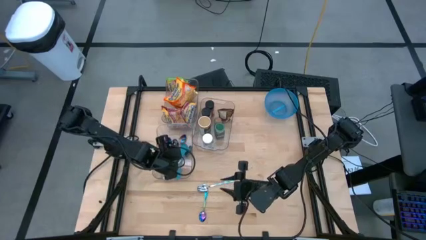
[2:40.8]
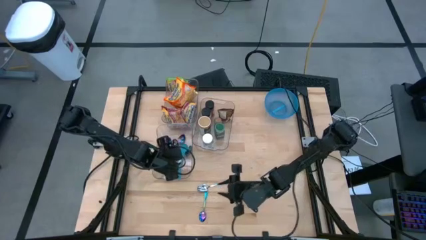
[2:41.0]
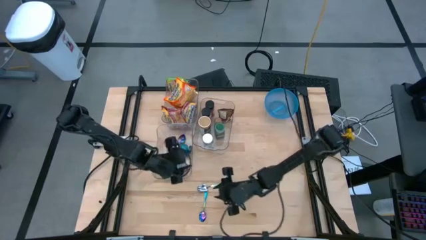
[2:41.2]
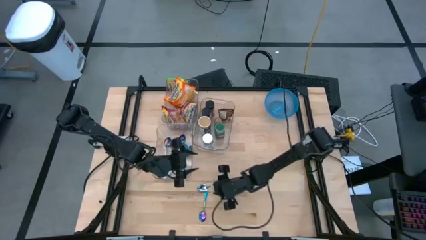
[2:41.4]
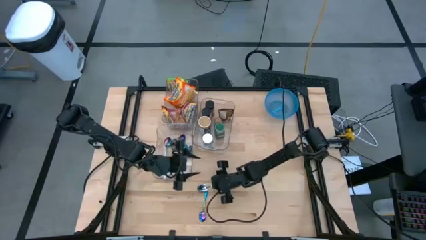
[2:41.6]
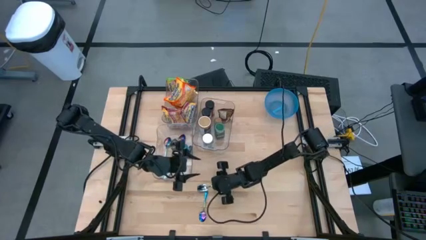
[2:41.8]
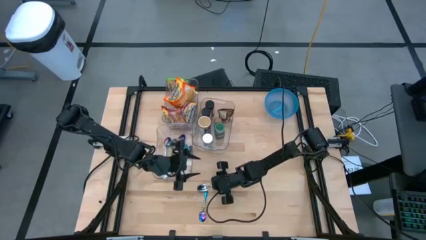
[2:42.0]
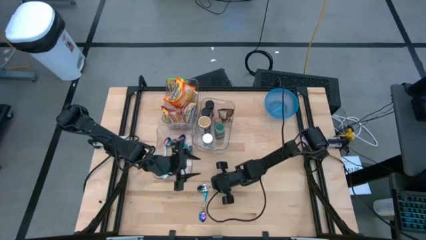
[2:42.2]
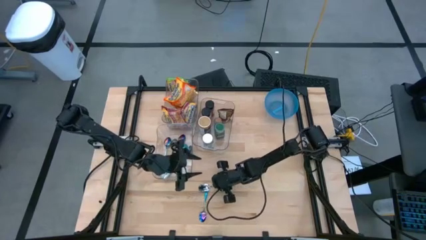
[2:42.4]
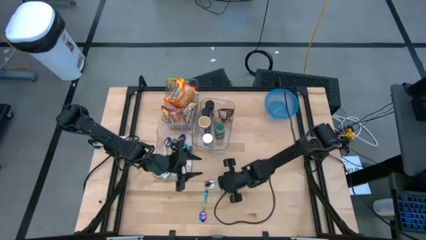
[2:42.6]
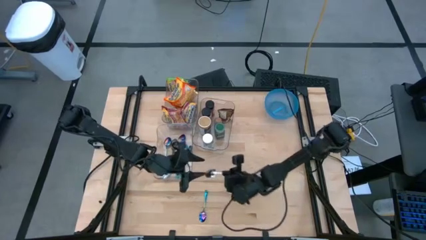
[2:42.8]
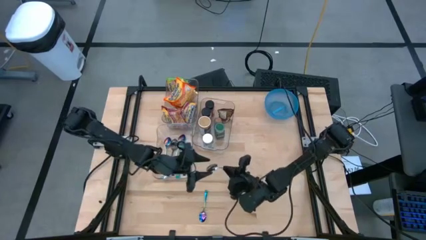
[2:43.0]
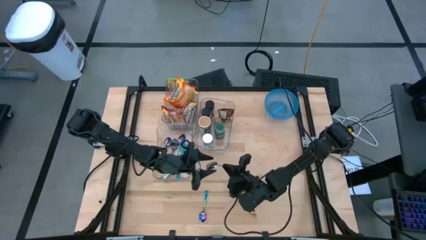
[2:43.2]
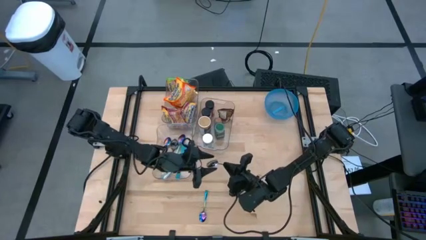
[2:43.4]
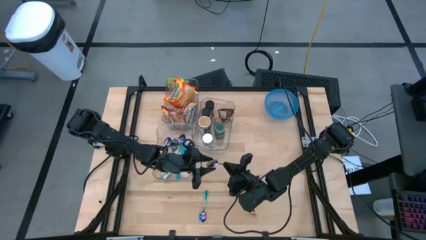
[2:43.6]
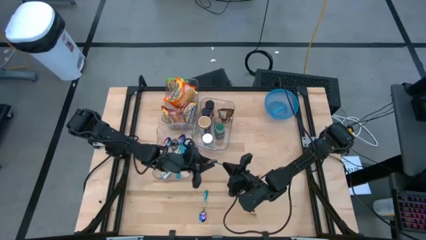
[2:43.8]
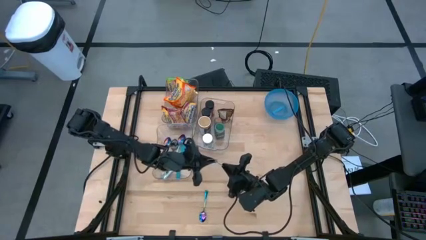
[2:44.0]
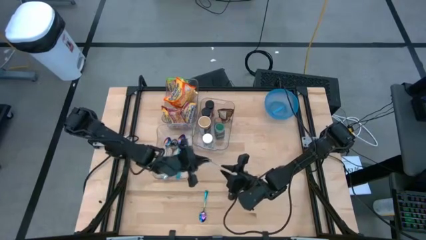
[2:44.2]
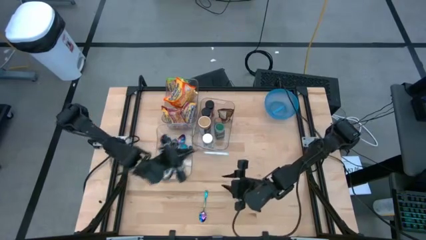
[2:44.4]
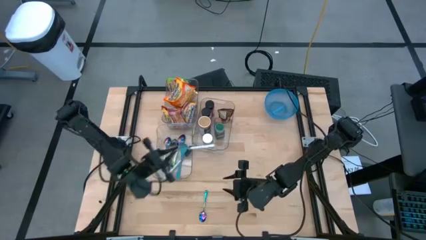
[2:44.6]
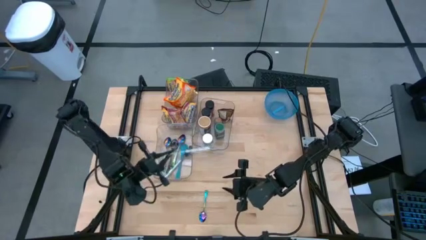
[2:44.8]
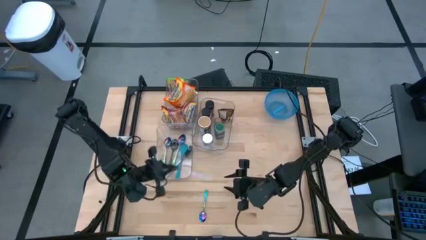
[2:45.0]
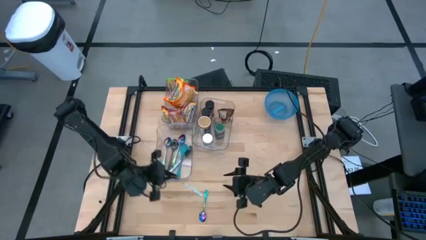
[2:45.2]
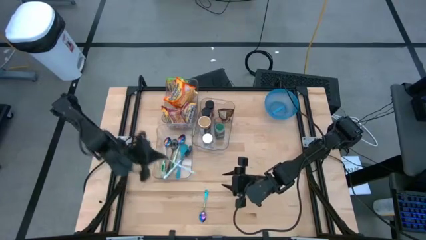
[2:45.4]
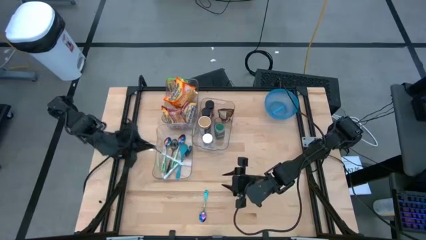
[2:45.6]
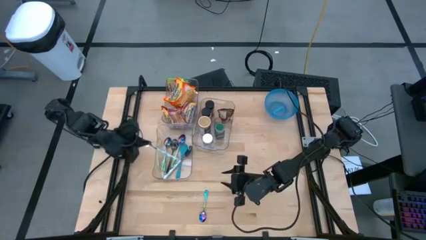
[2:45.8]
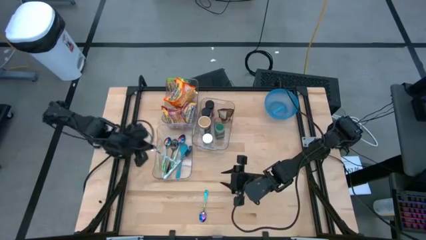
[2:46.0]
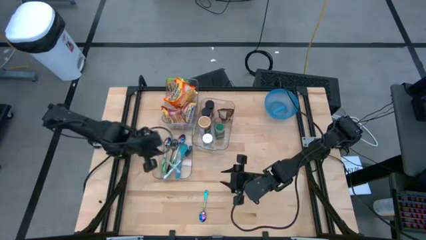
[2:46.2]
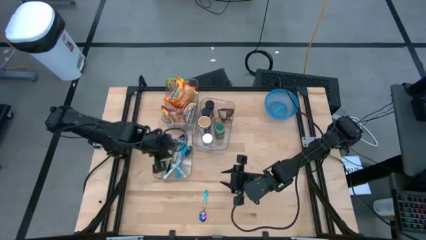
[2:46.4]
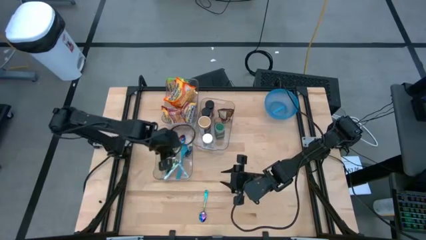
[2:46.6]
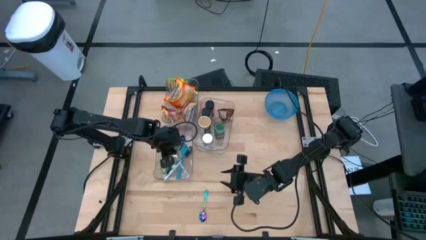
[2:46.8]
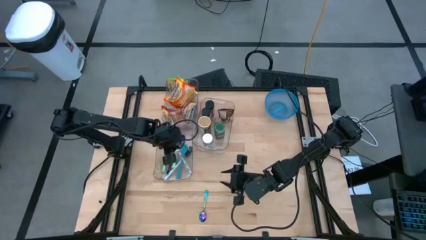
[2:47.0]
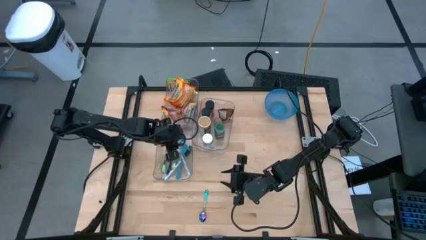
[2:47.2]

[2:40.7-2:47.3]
Task: Pick & Place Food Item
Put the white patterned spoon into the bottom transparent bin

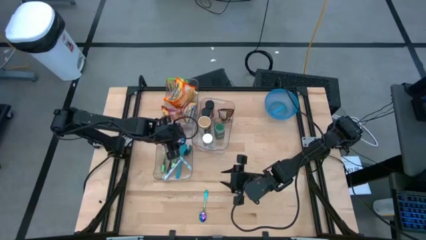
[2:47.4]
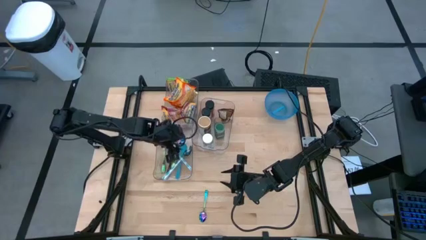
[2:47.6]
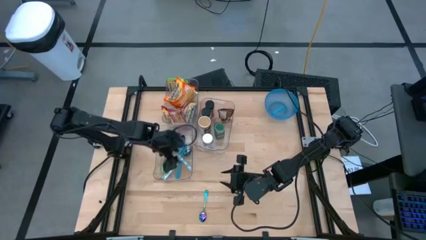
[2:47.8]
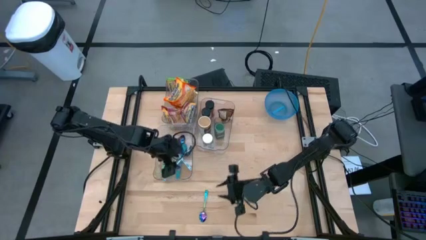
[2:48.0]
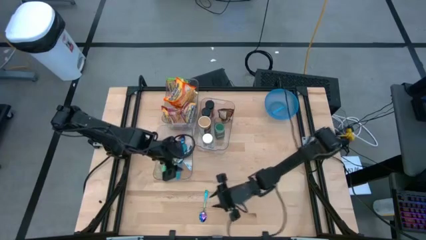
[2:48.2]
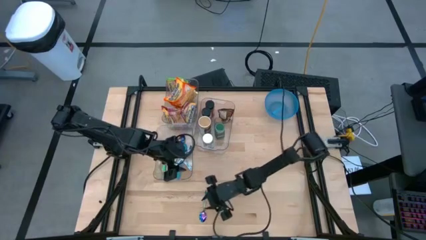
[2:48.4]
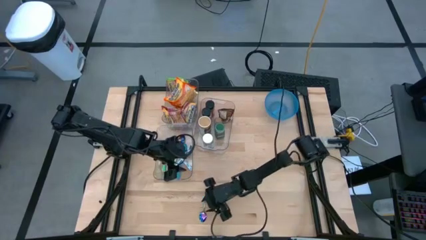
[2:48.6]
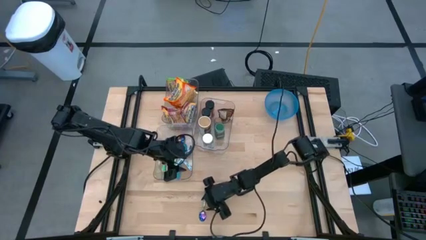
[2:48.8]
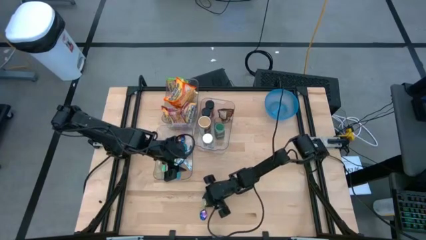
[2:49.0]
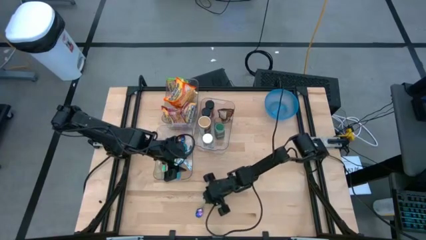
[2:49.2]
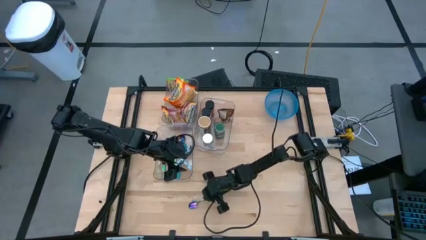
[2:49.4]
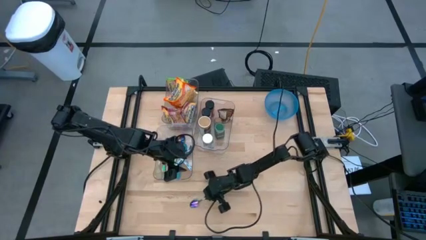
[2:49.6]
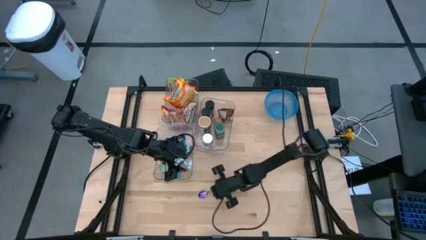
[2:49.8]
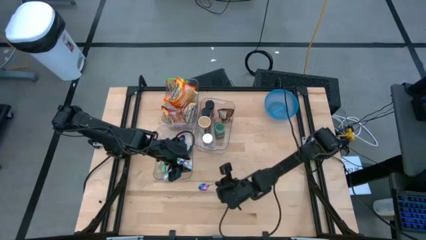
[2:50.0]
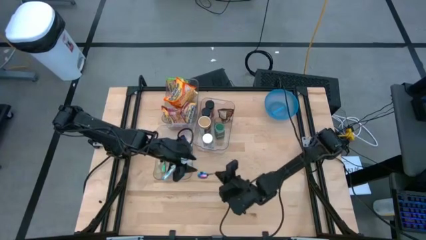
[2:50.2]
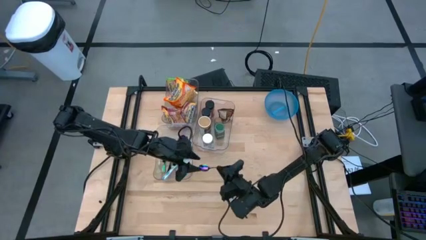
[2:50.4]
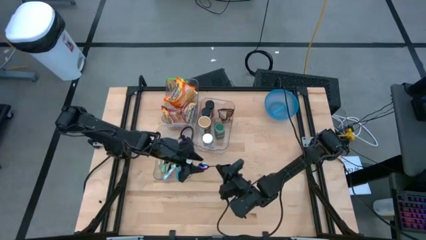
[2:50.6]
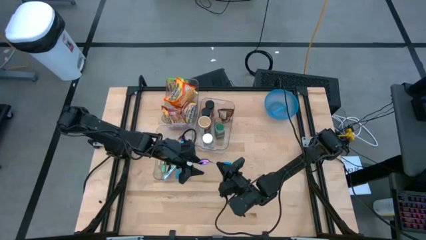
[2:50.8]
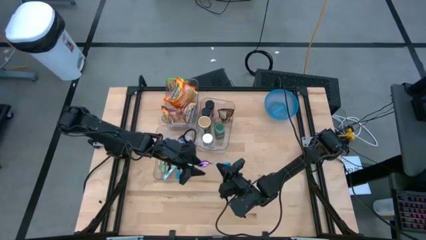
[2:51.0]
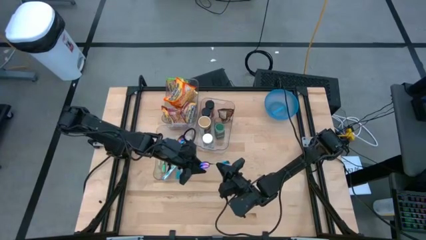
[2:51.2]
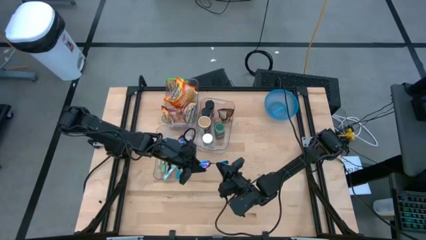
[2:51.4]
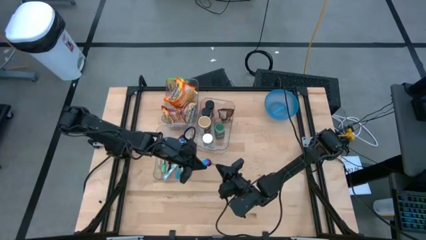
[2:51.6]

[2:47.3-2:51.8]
Put the purple spoon into the bottom transparent bin

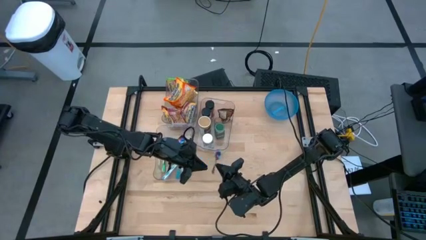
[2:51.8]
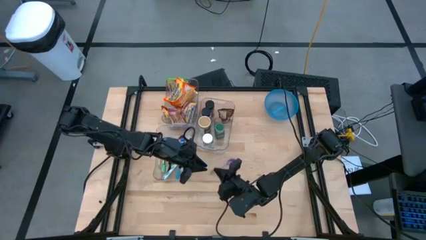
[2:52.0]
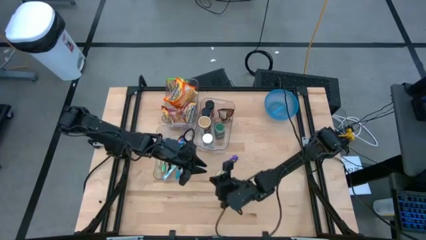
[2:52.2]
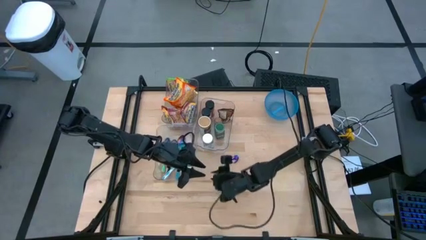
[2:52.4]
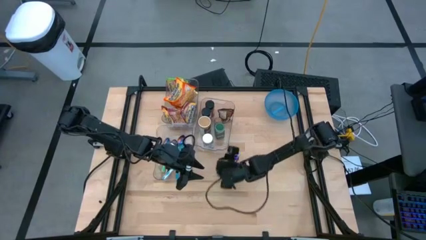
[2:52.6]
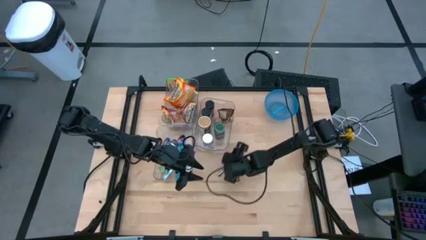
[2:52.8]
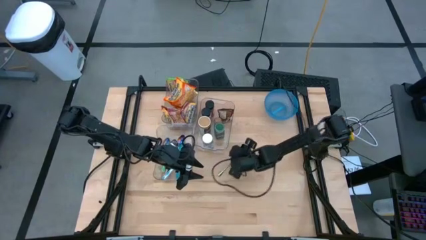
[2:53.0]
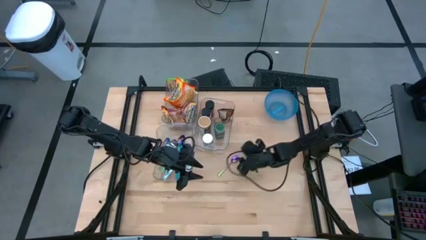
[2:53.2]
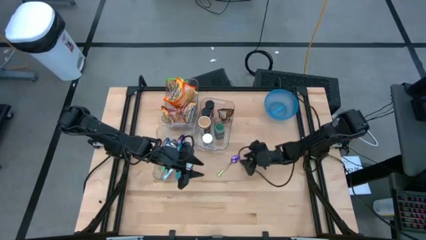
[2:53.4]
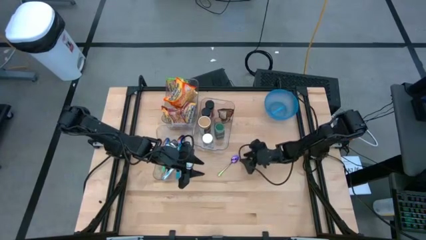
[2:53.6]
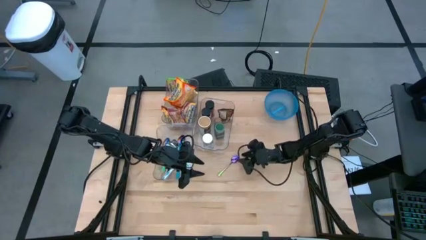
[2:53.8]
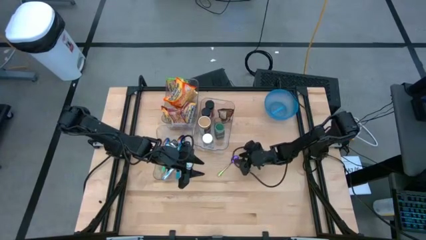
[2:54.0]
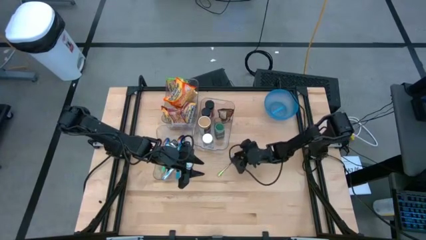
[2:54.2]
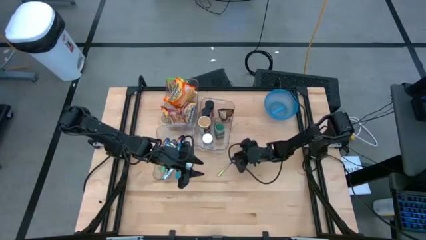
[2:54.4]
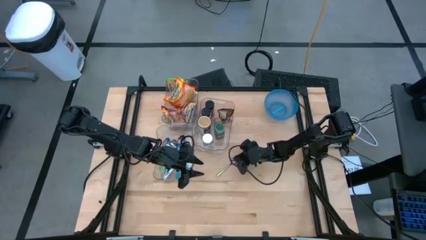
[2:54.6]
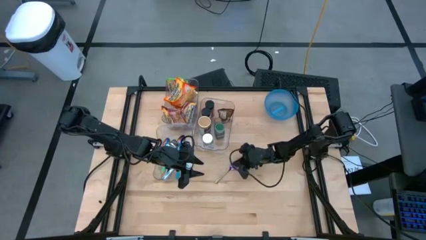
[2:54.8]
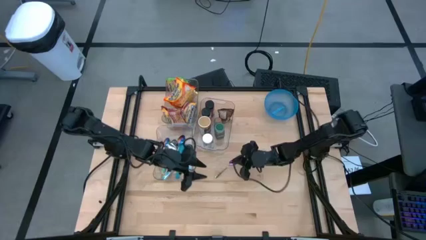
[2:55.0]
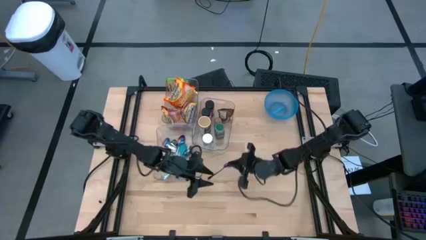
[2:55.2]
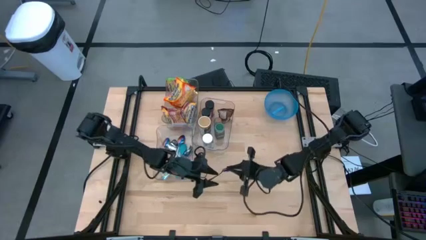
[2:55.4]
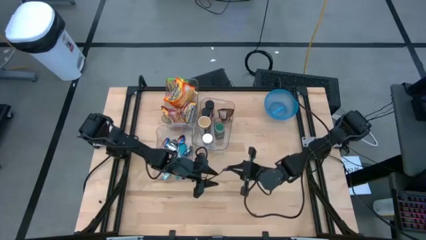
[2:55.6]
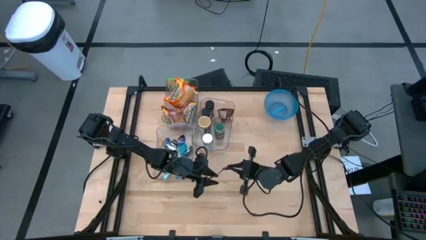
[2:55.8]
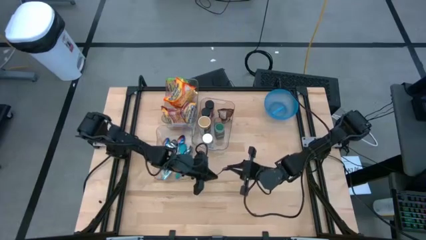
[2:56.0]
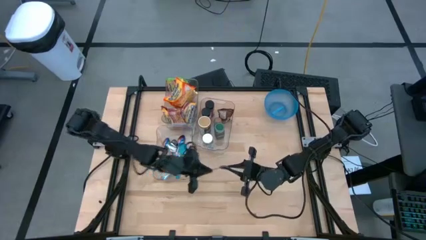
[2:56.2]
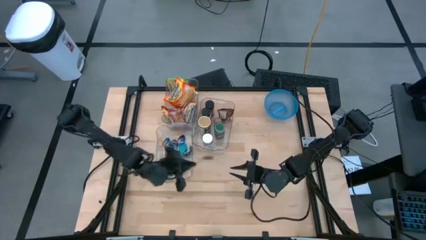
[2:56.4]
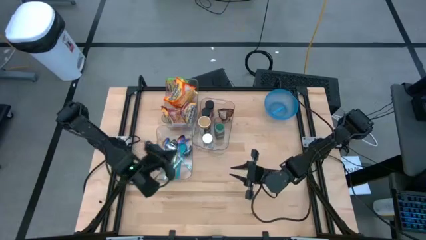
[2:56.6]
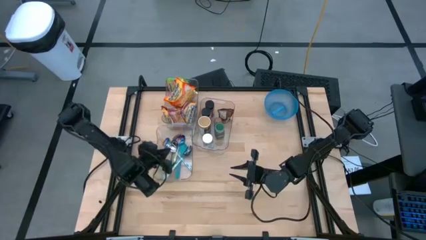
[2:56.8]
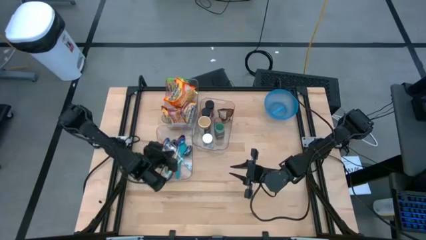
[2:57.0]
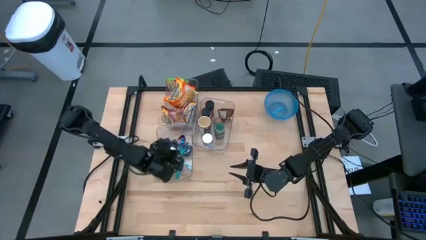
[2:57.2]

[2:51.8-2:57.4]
Put the purple spoon into the bottom transparent bin
